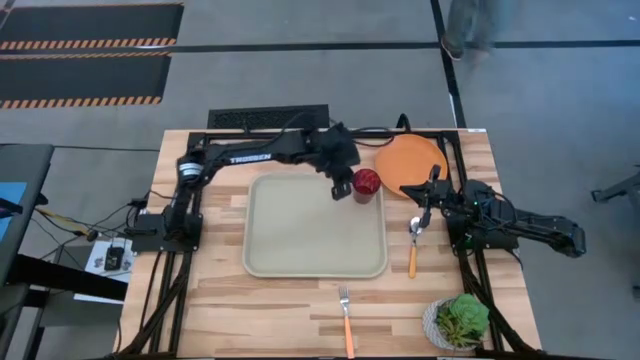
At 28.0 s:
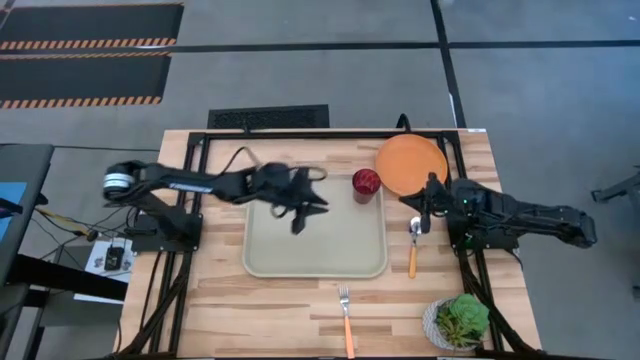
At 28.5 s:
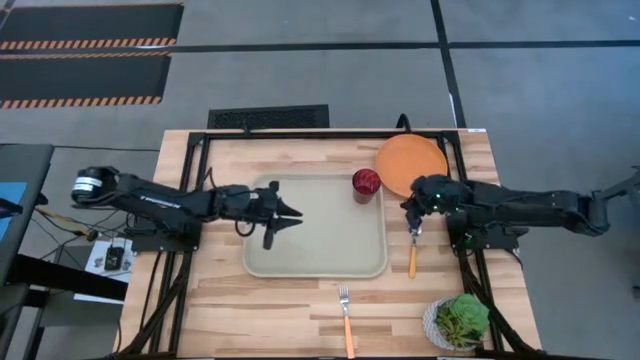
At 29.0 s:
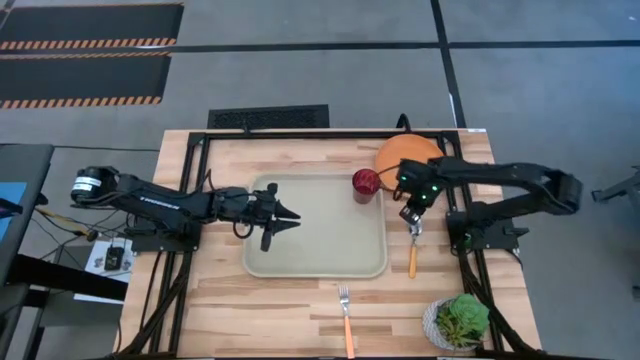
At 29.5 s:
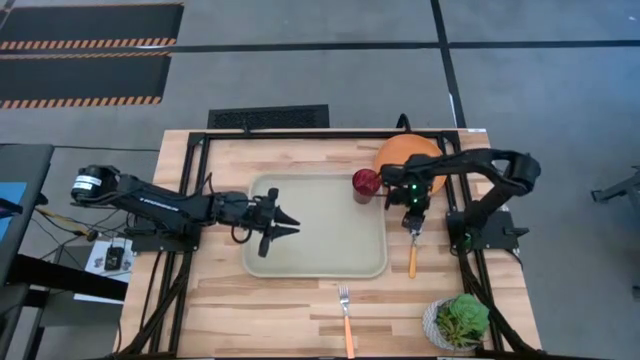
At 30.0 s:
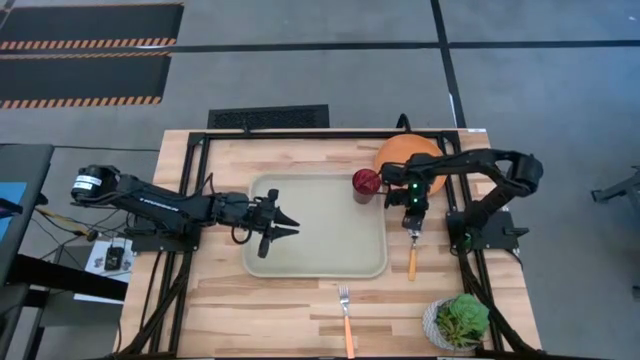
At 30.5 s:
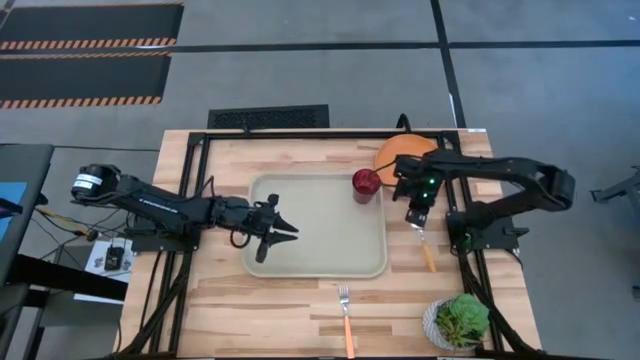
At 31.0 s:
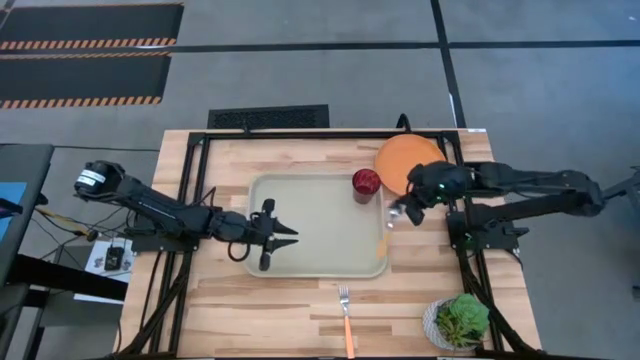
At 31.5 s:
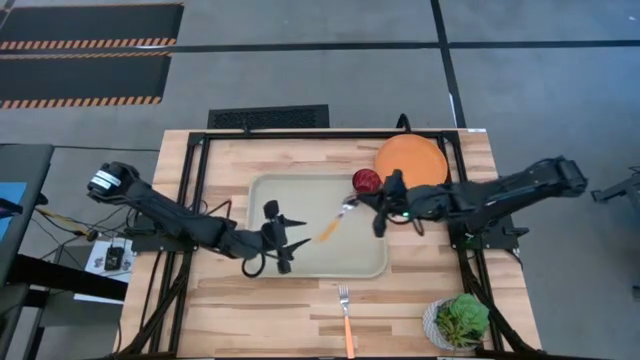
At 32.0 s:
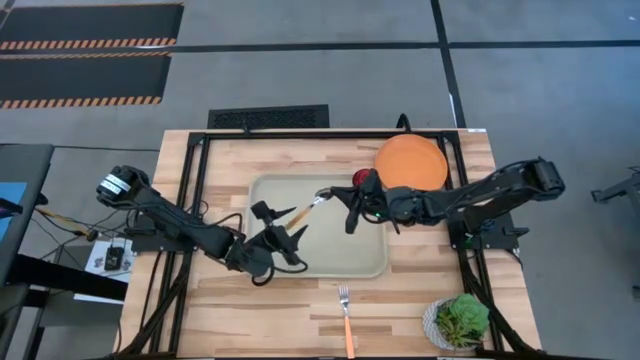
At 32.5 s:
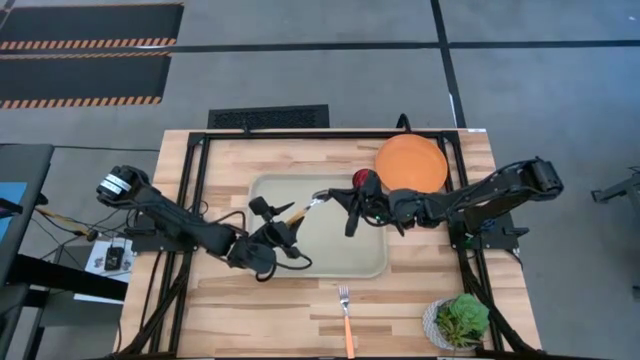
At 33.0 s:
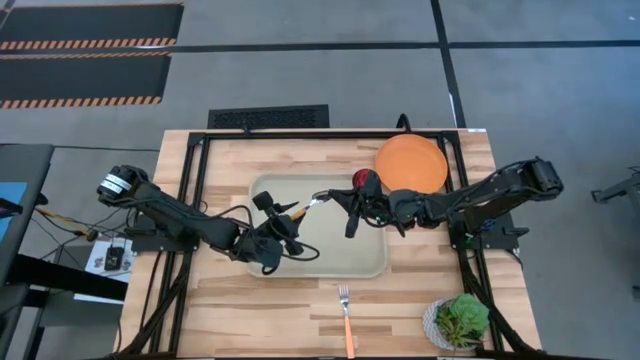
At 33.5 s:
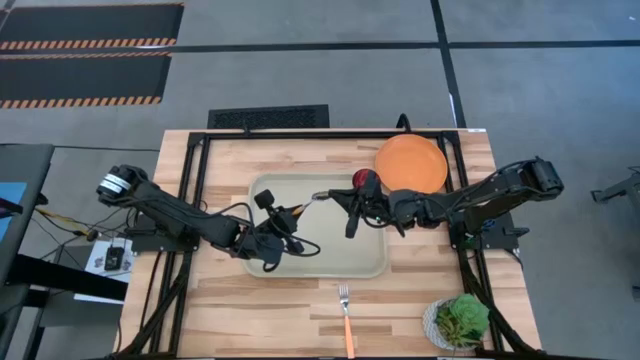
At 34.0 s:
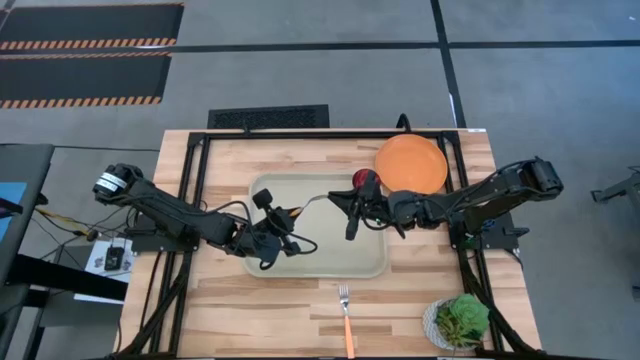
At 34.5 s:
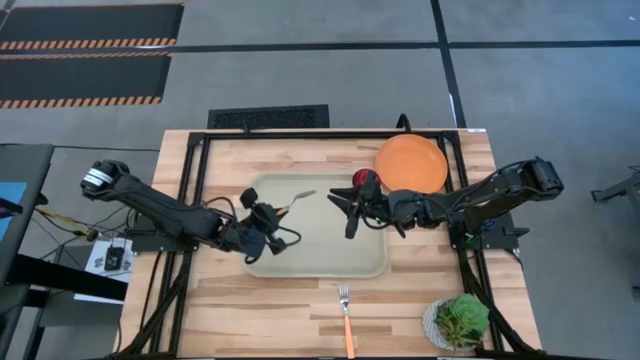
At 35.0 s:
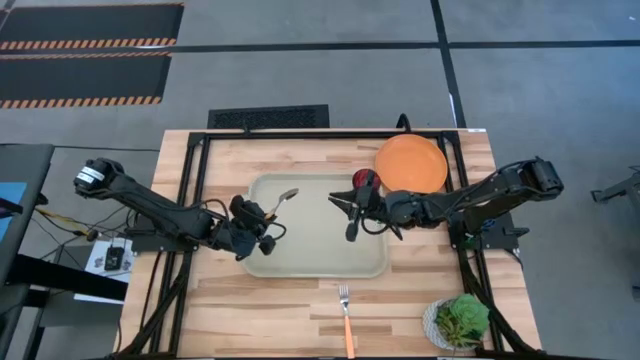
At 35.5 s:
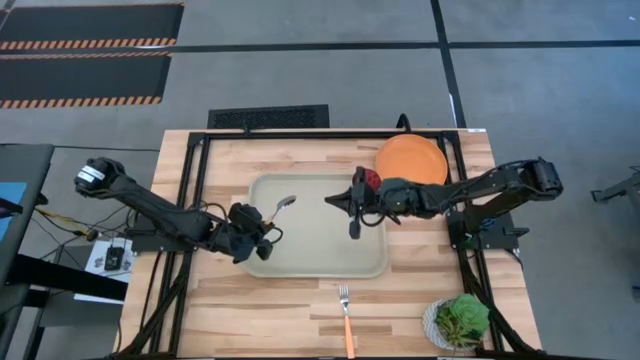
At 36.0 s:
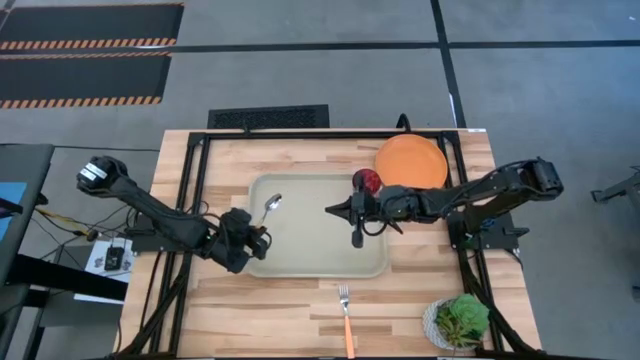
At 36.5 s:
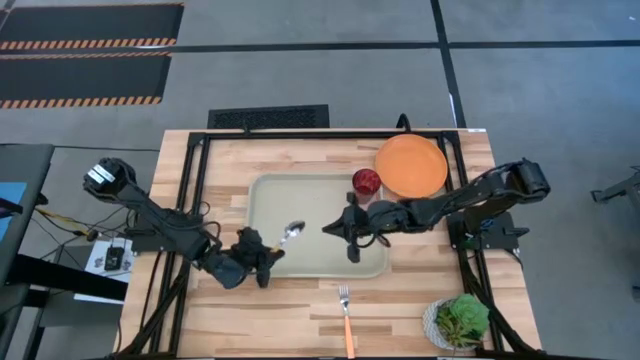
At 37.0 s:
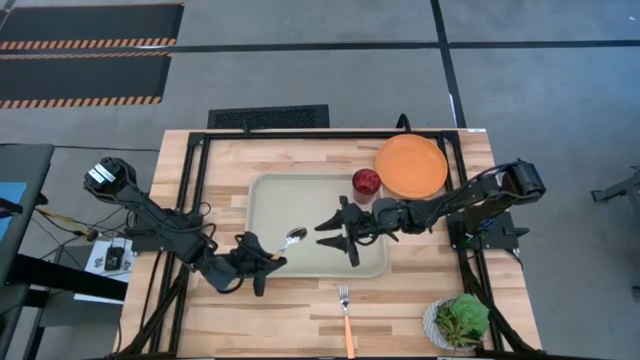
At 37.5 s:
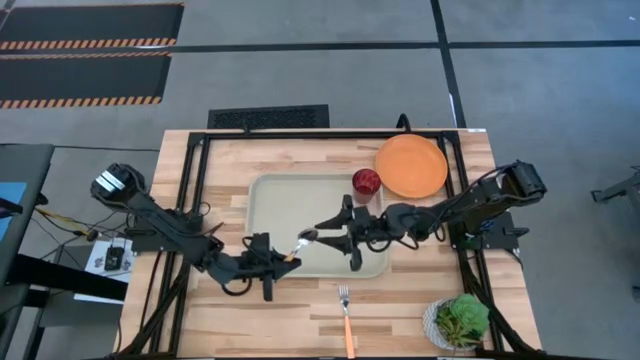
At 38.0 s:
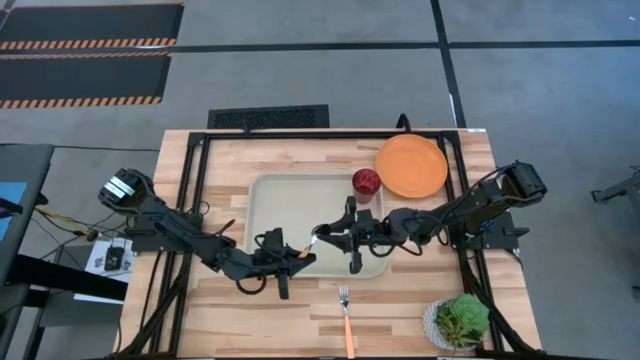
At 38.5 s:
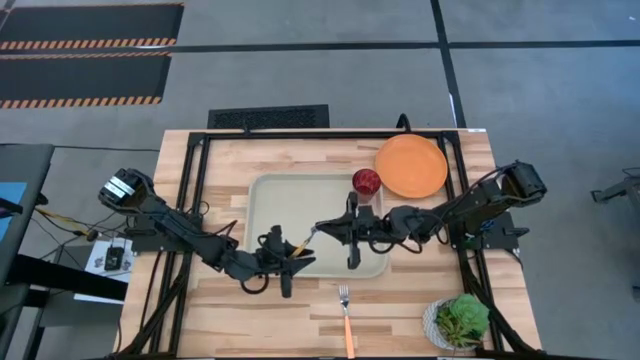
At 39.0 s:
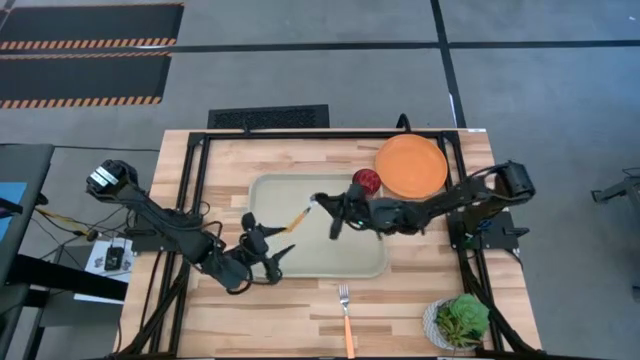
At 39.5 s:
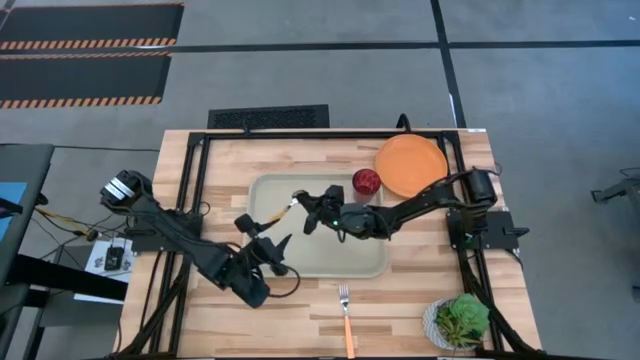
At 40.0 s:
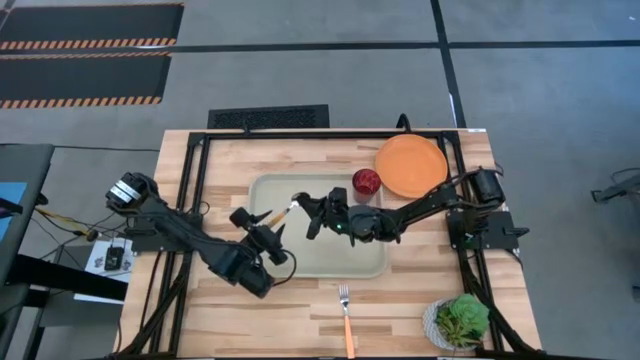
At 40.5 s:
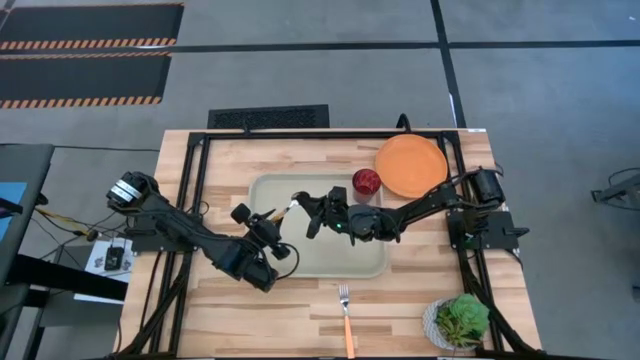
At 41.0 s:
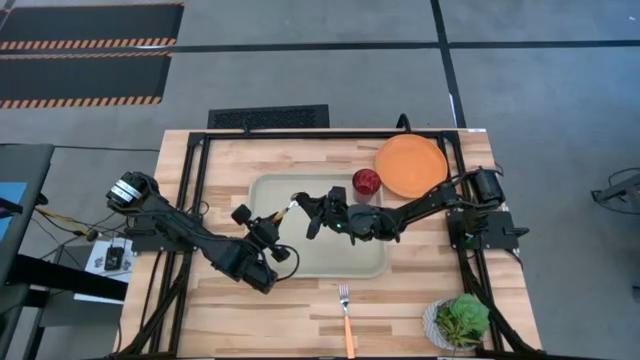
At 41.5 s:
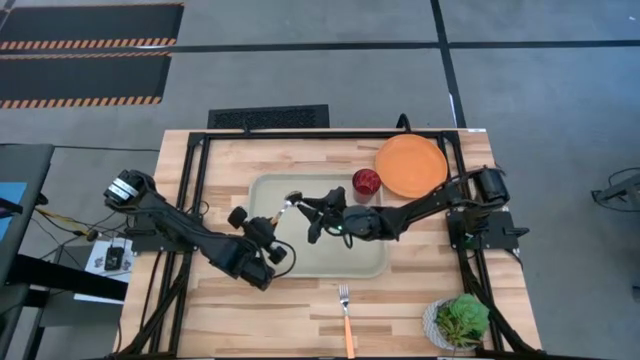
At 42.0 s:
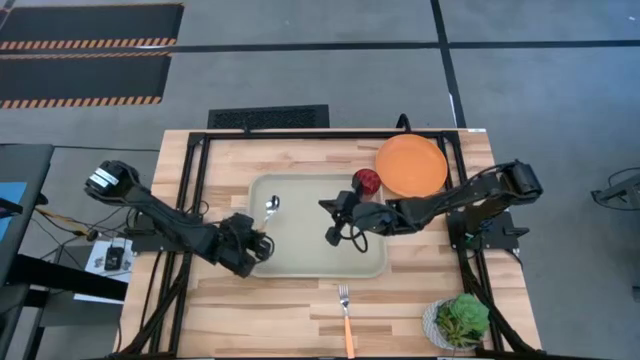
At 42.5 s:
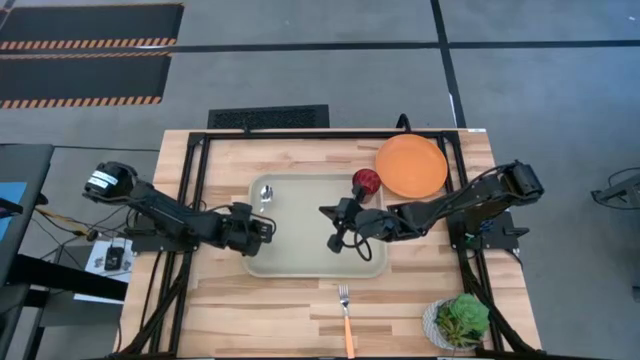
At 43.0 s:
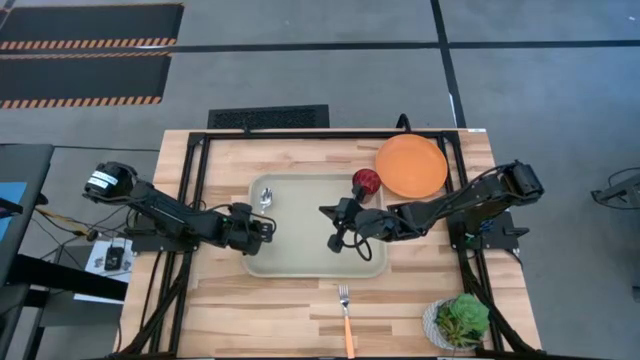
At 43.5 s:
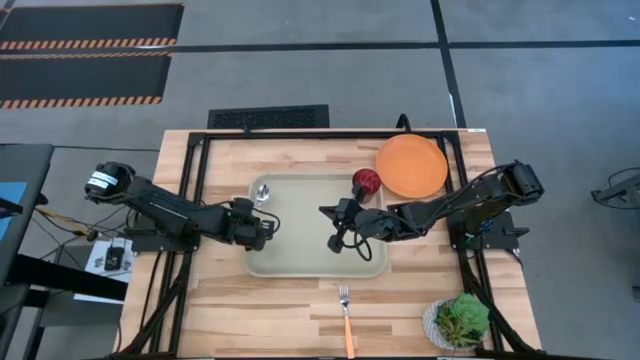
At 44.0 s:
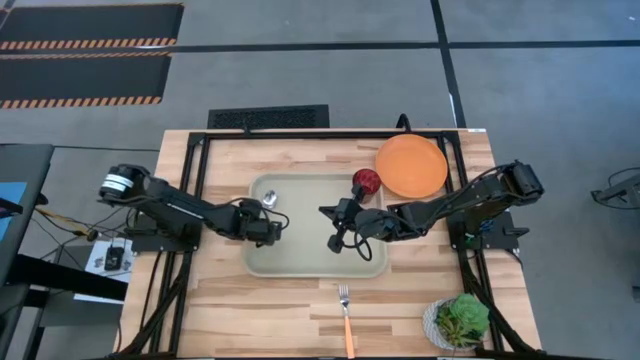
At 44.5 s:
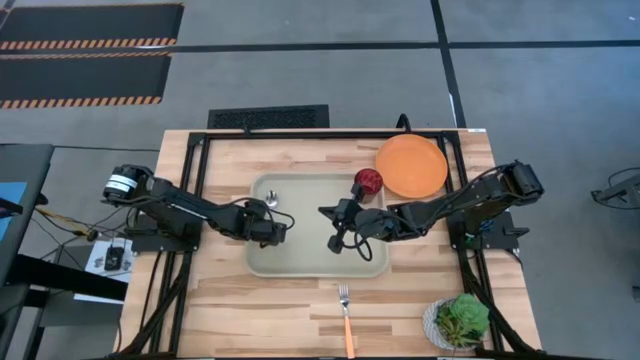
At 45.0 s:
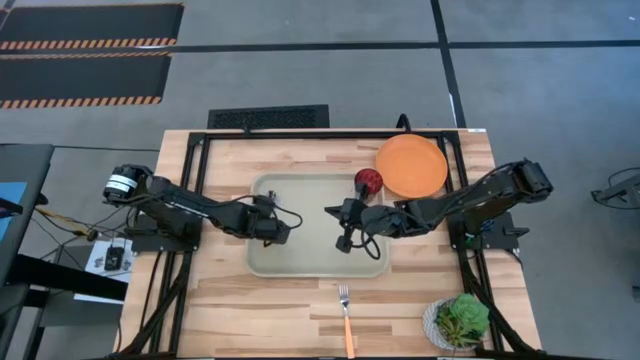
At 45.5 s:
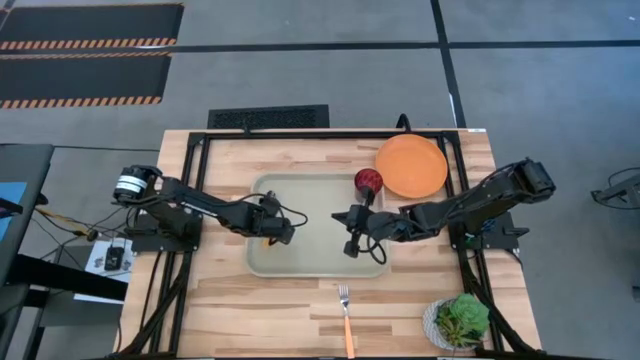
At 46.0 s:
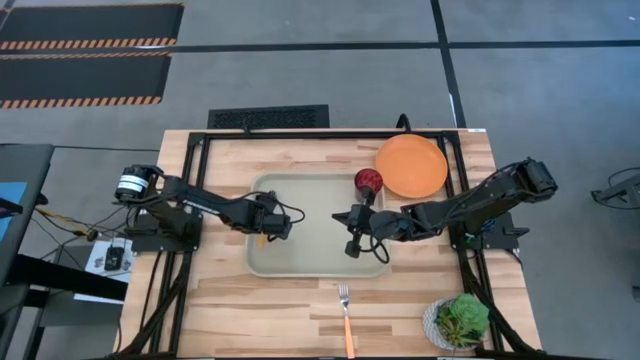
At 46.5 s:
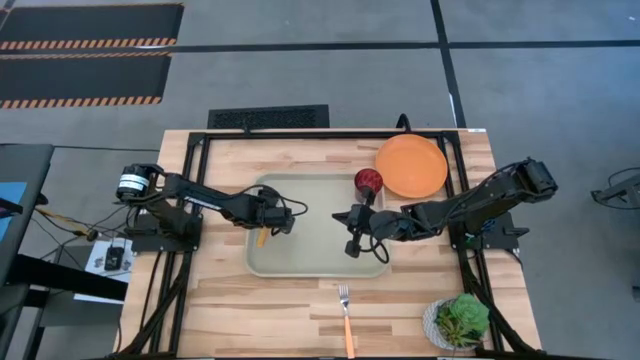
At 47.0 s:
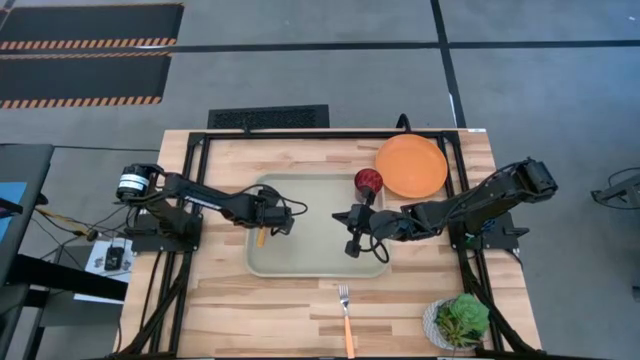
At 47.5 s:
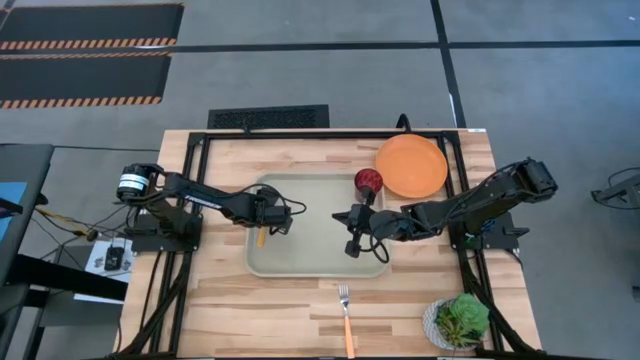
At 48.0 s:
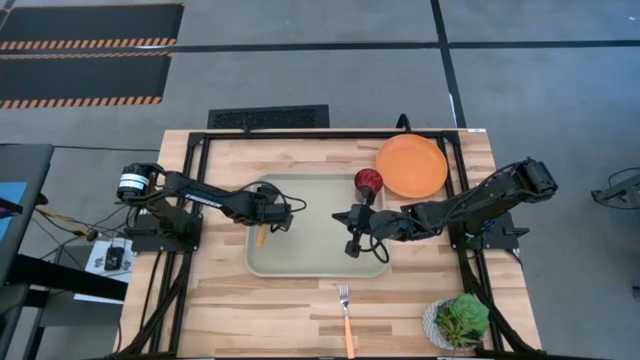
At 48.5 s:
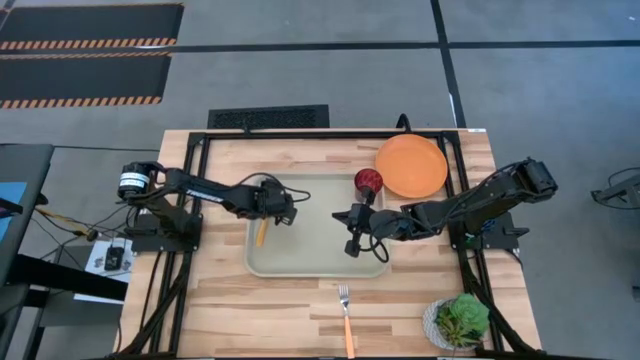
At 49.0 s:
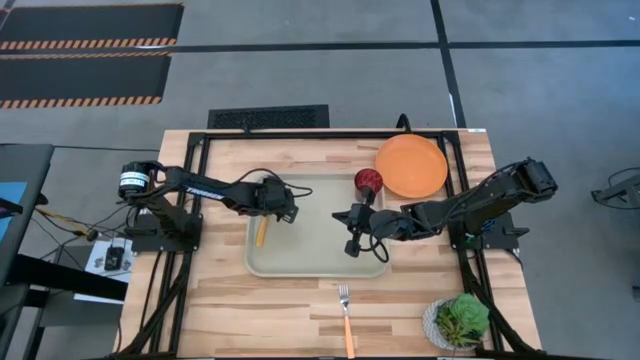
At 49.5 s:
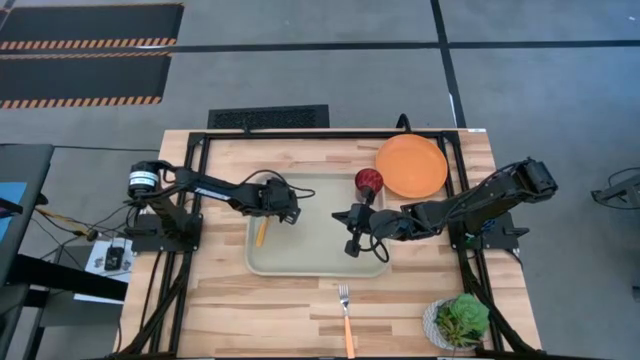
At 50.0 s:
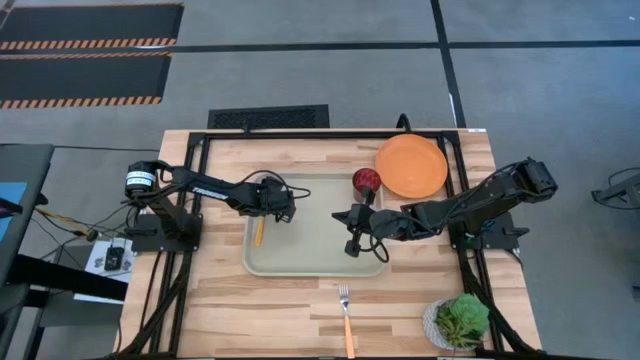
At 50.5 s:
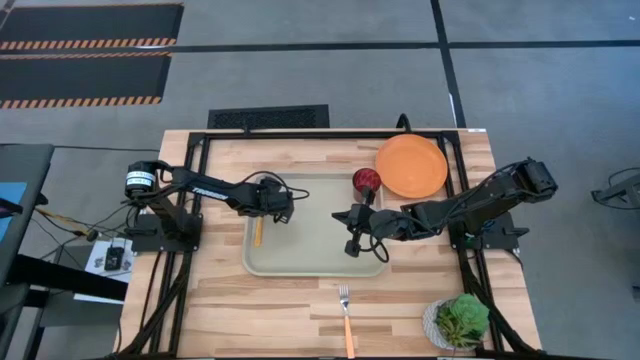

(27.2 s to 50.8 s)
Task: Pick and place plate/cup/fork/spoon on tray
Put the orange spoon on the left side of the gray serving tray
